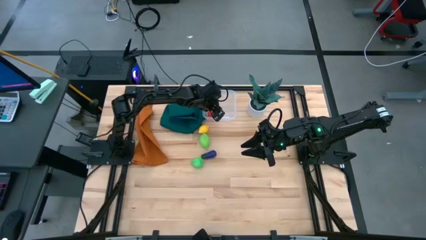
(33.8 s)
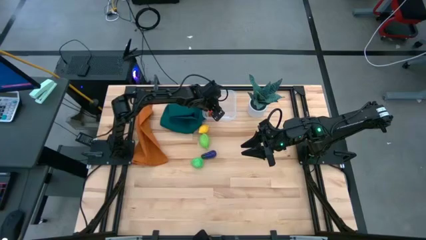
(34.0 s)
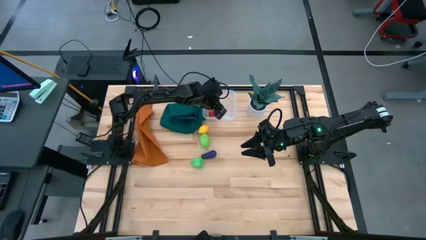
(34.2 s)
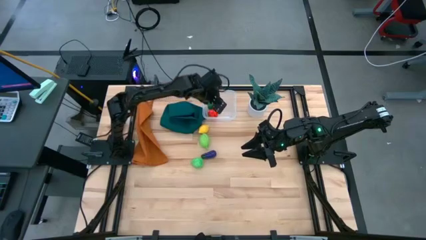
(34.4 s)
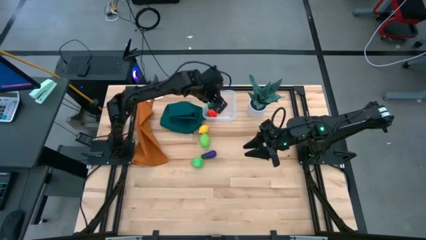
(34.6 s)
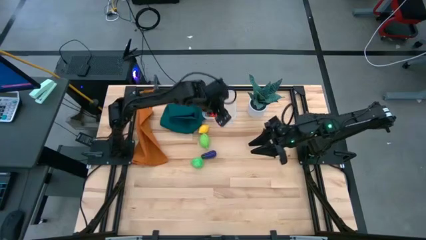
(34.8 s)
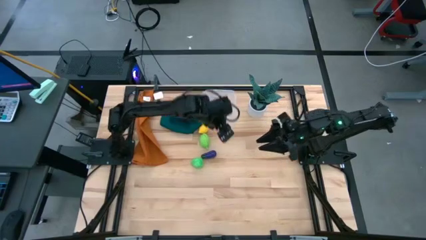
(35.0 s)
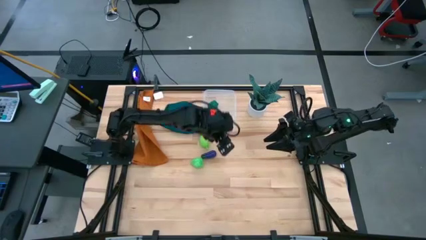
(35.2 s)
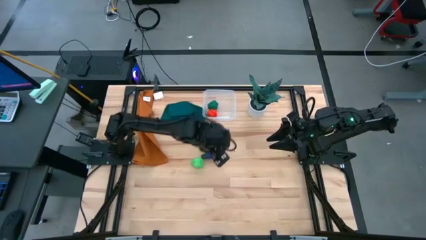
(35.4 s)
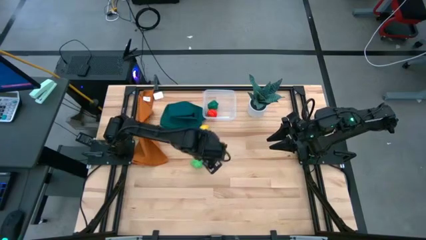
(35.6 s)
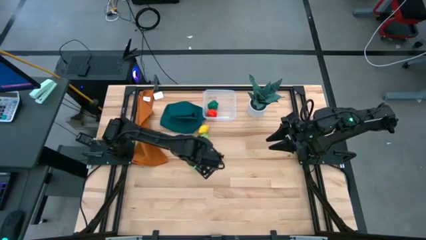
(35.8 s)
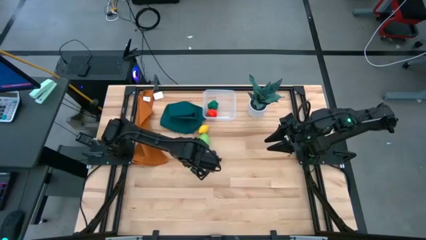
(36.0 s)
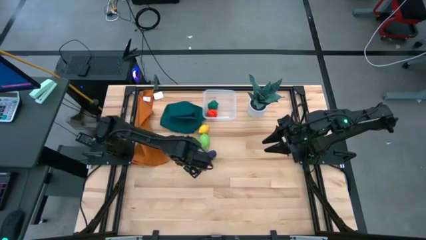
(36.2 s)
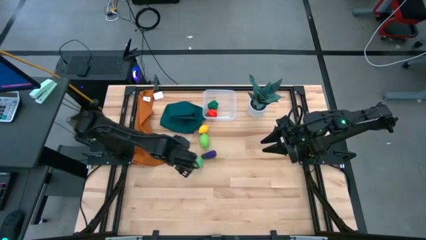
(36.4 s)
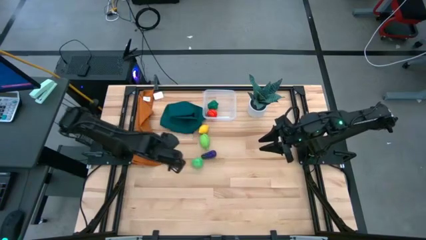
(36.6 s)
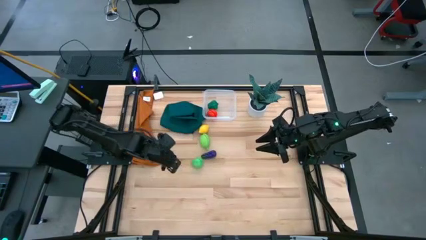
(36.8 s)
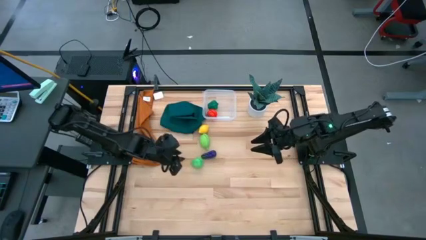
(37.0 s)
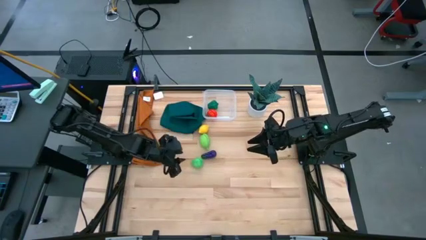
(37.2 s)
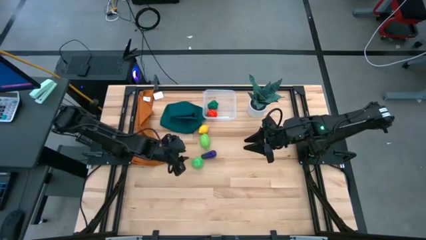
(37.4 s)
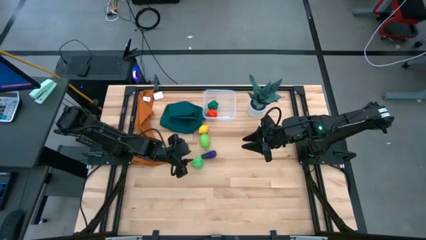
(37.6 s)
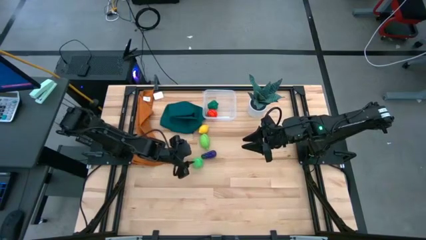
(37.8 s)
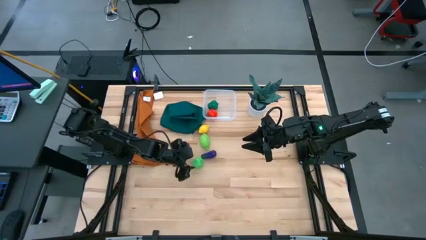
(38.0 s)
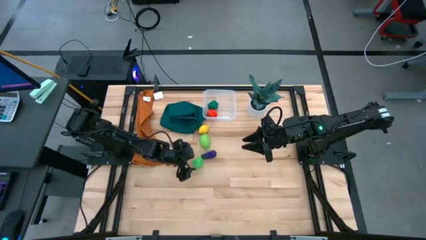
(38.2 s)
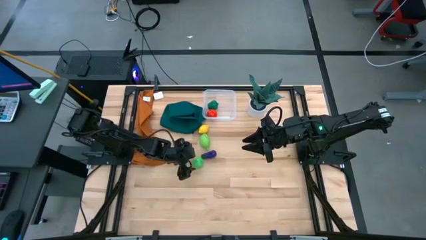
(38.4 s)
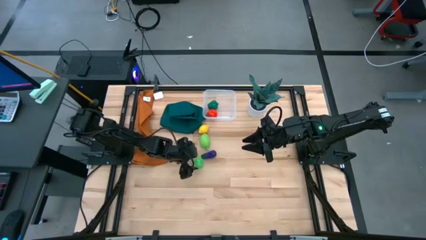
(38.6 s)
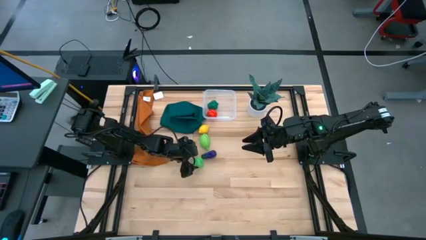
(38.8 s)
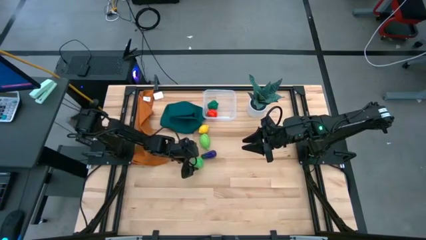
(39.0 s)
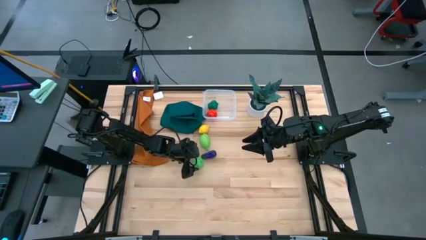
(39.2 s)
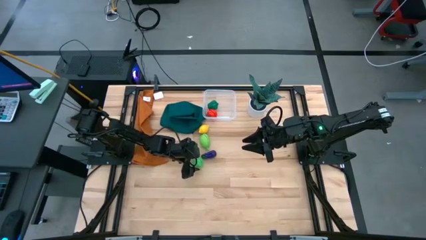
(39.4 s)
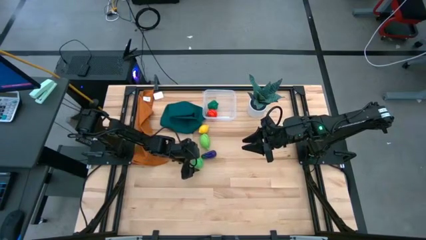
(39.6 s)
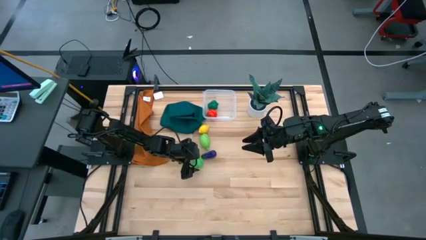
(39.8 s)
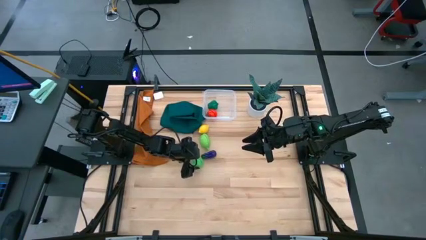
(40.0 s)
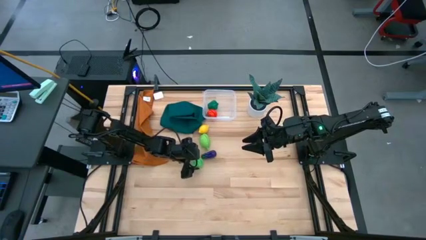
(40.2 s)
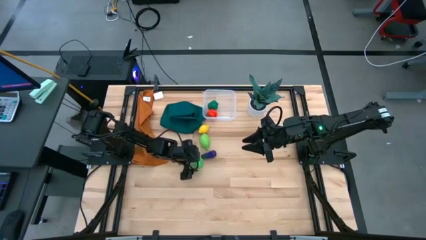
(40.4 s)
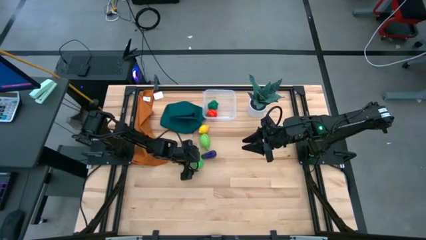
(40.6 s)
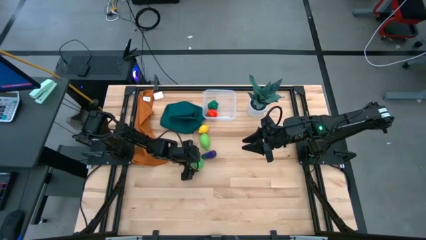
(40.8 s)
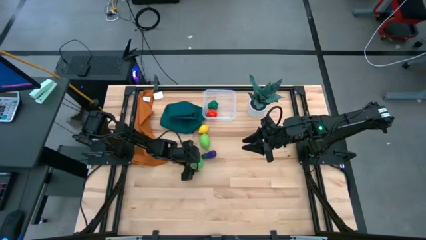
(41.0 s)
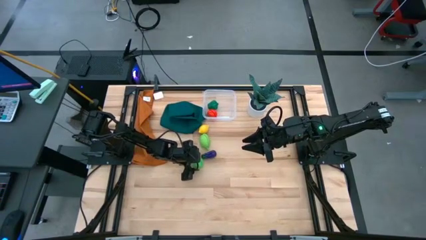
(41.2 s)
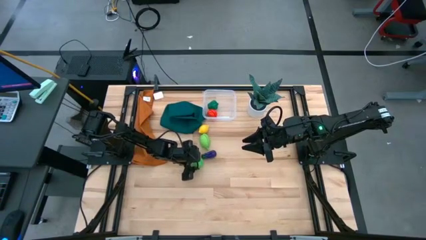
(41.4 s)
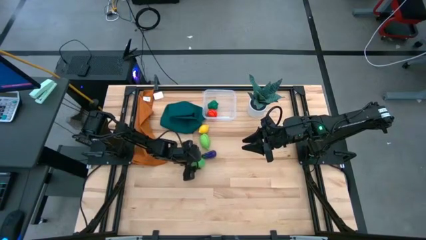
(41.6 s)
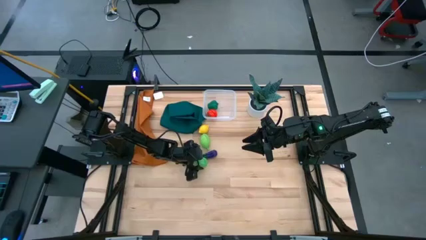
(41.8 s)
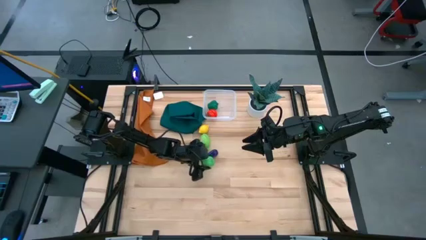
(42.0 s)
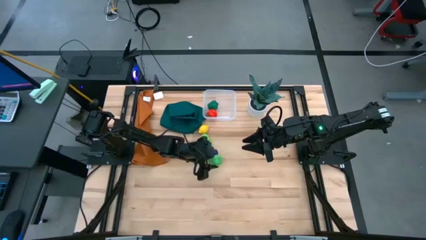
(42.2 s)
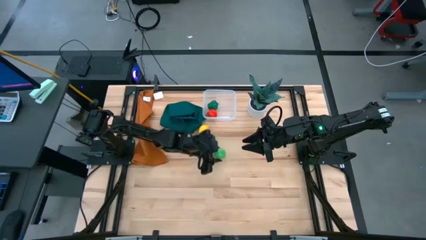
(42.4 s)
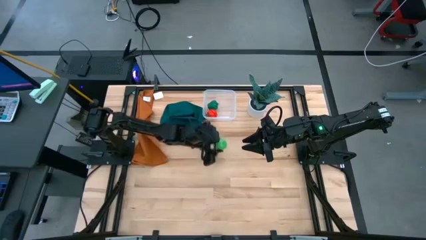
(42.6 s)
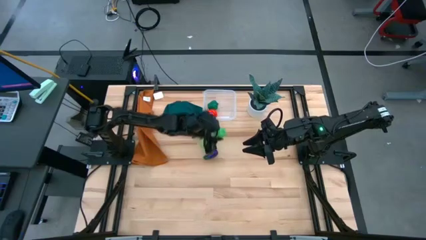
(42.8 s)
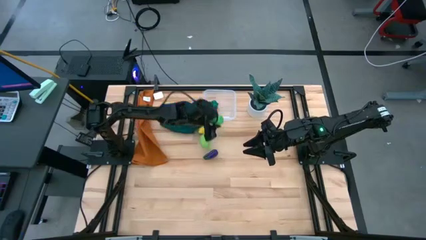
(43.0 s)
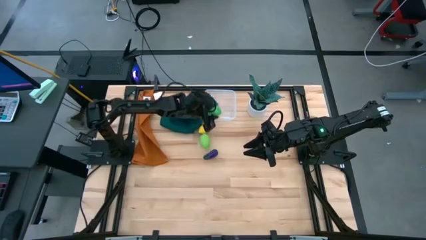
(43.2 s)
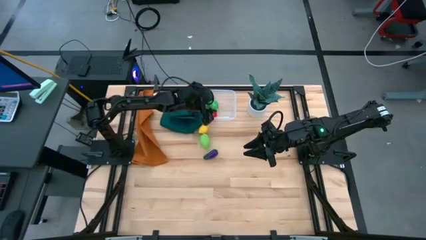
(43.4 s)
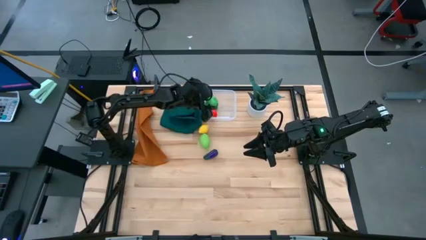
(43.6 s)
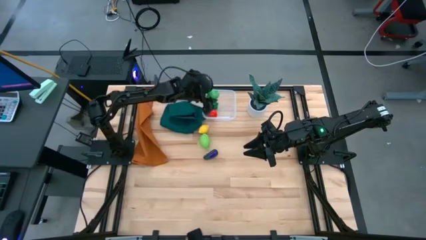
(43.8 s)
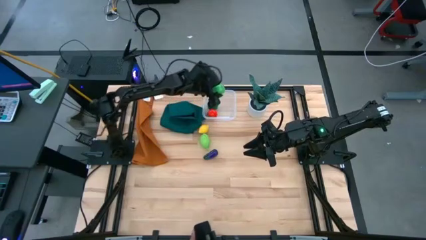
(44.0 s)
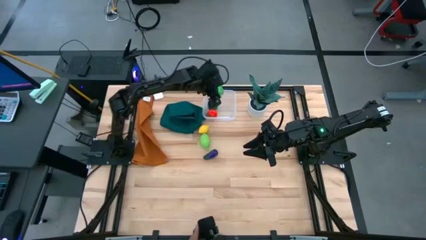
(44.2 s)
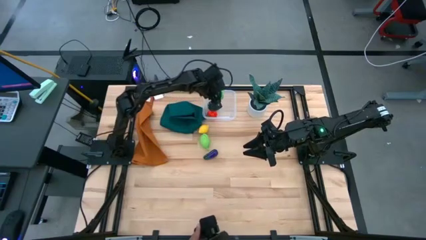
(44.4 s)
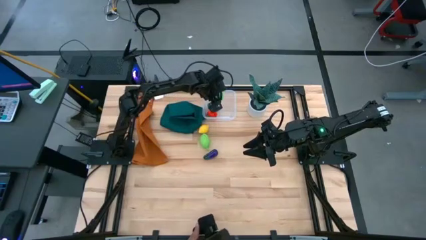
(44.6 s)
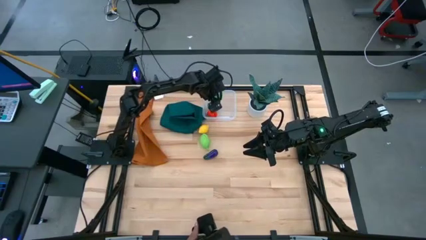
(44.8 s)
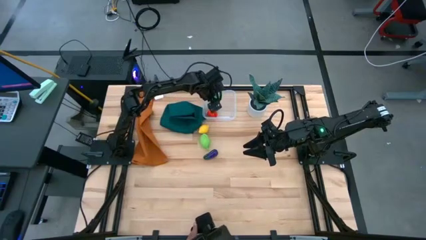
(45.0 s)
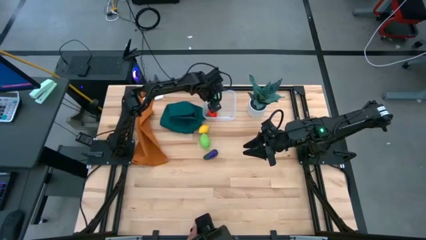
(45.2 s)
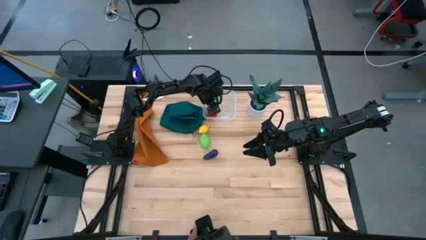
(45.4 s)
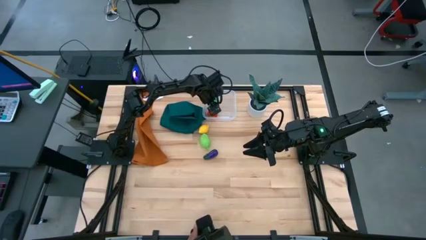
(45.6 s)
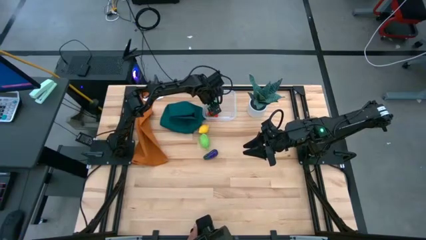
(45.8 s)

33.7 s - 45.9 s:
Task: Pick and placing Produce into tupperware
Put the green pear into the transparent bin
